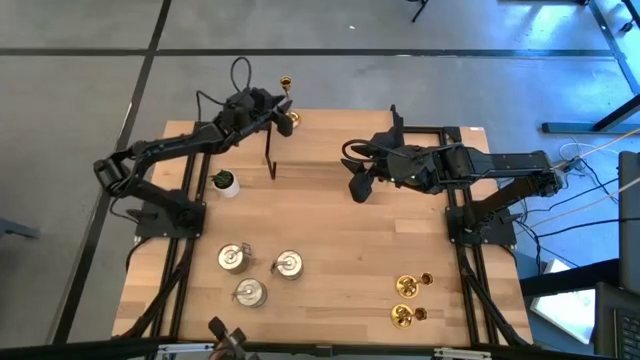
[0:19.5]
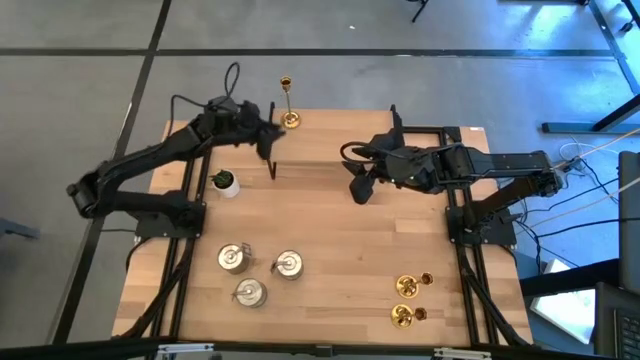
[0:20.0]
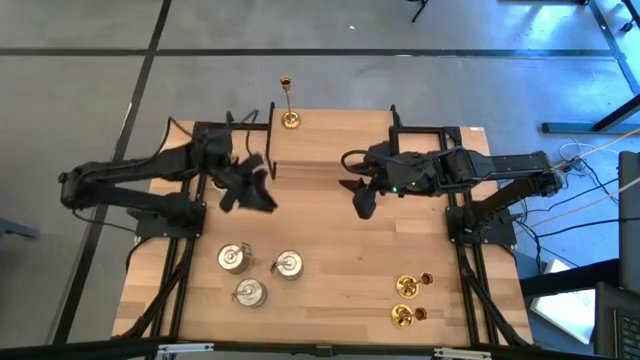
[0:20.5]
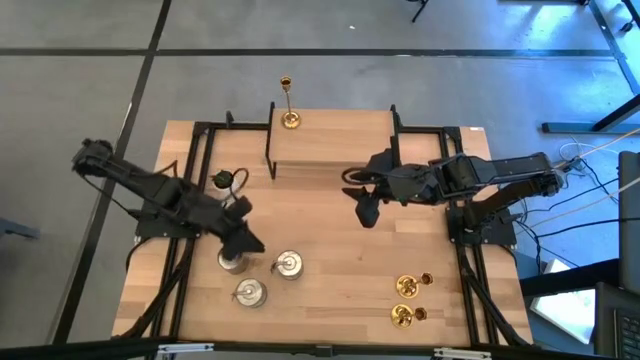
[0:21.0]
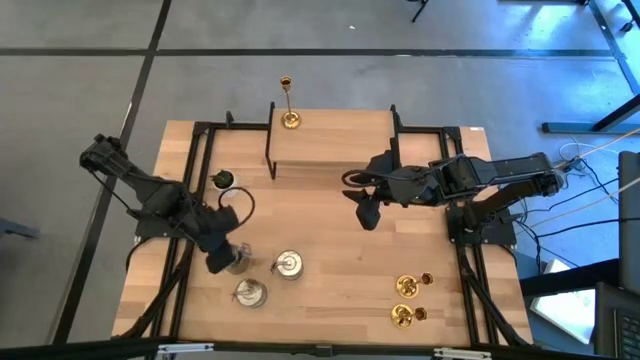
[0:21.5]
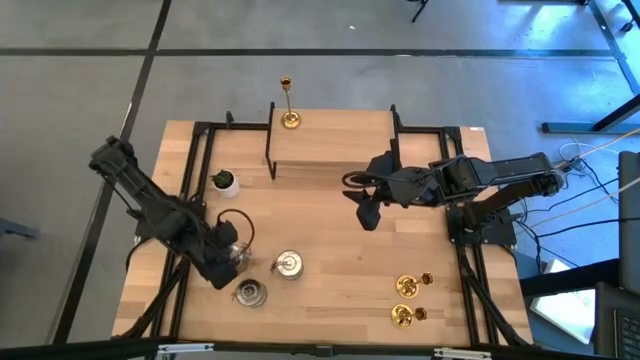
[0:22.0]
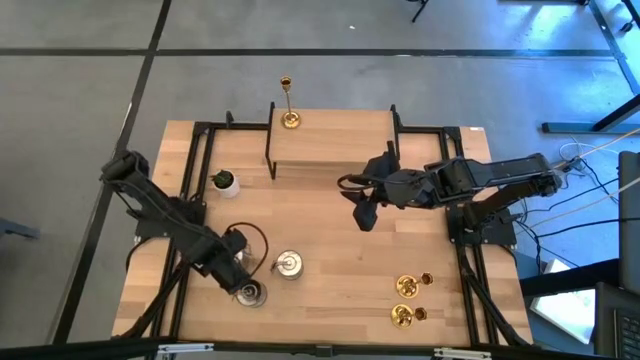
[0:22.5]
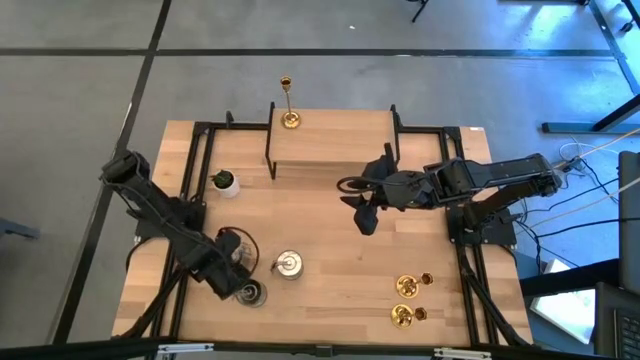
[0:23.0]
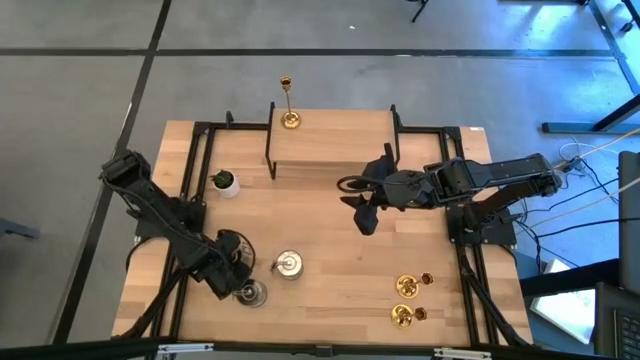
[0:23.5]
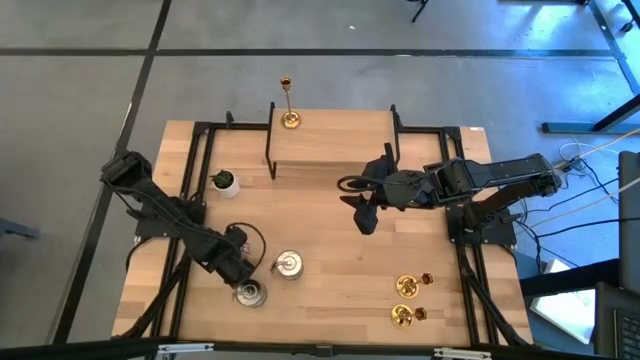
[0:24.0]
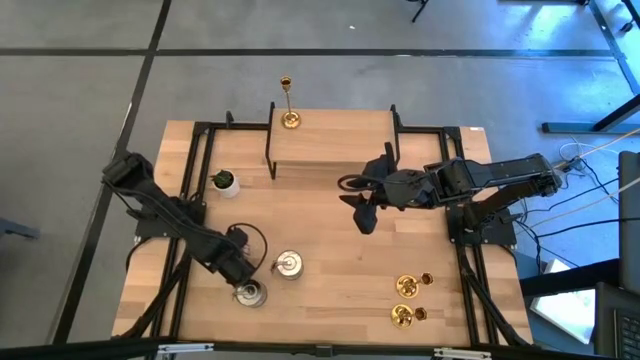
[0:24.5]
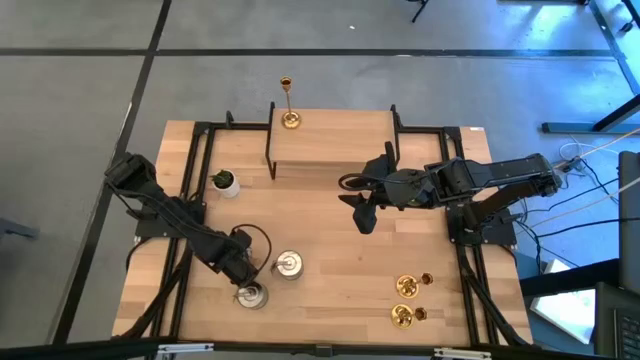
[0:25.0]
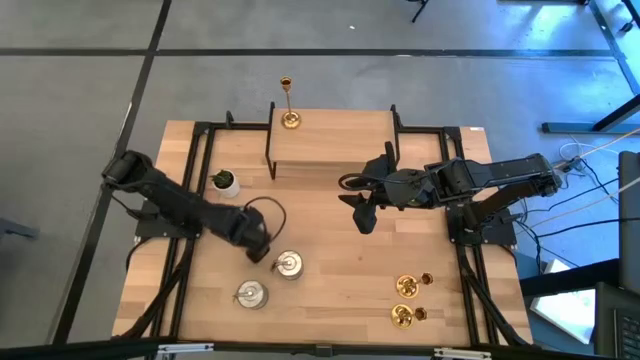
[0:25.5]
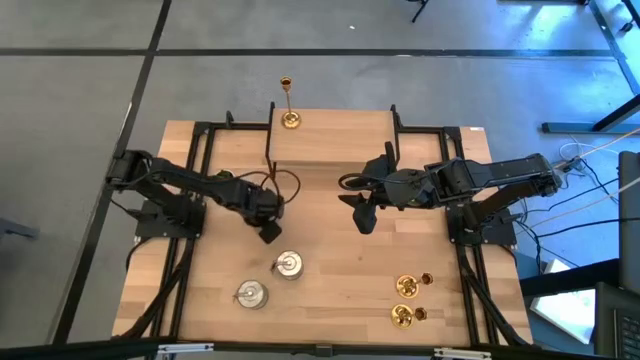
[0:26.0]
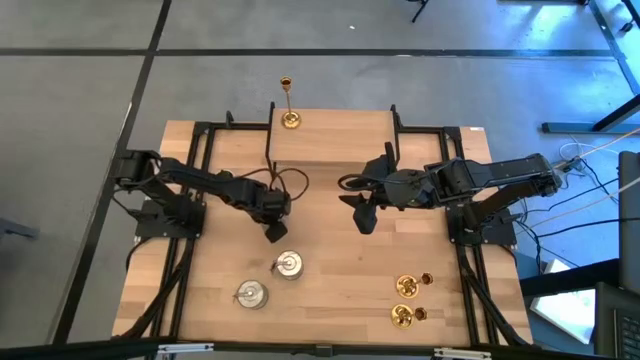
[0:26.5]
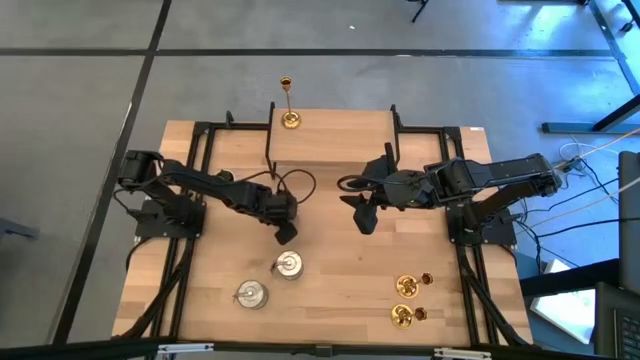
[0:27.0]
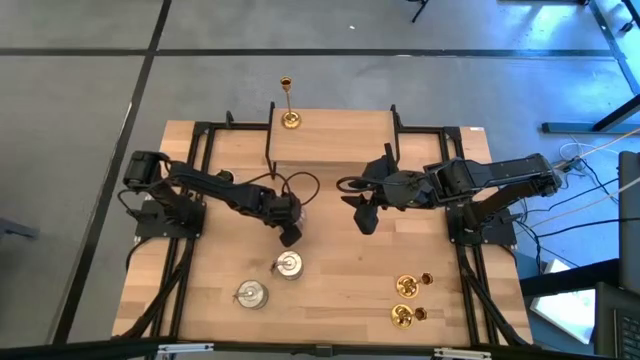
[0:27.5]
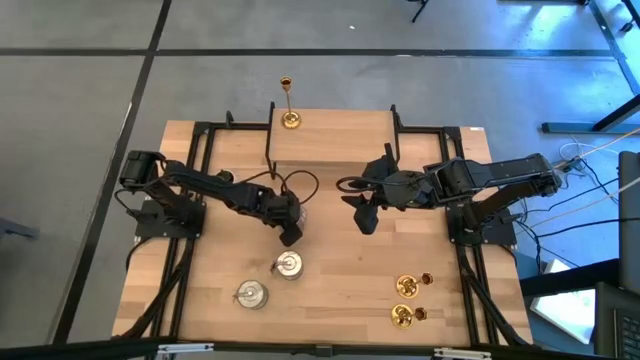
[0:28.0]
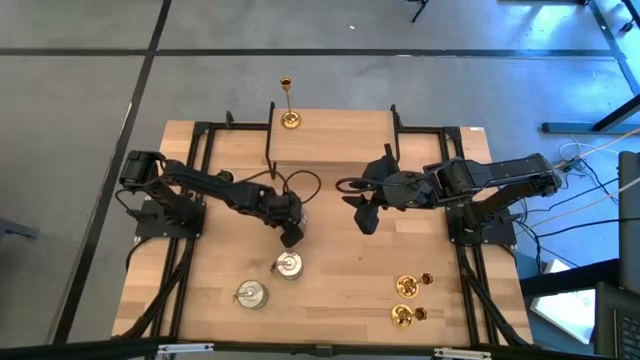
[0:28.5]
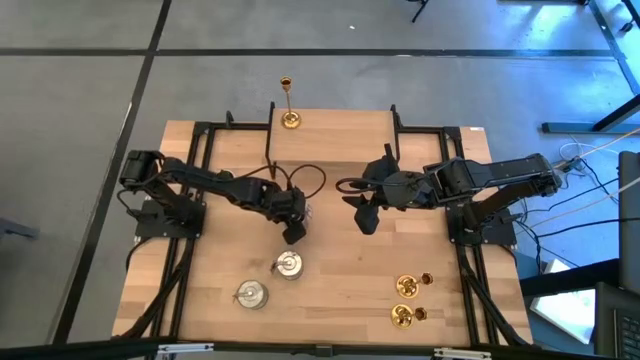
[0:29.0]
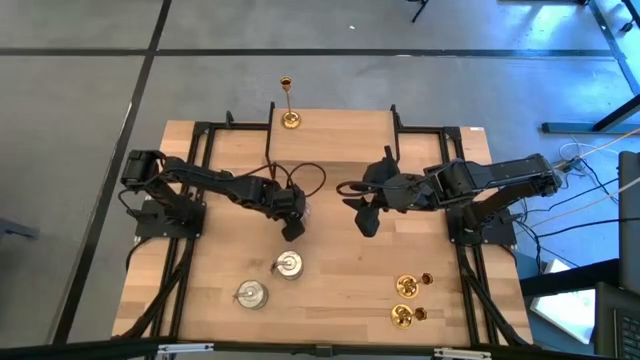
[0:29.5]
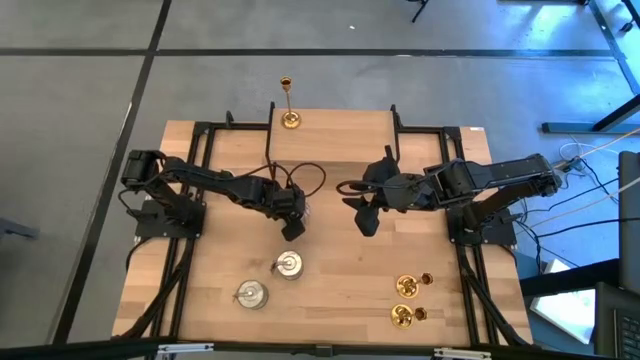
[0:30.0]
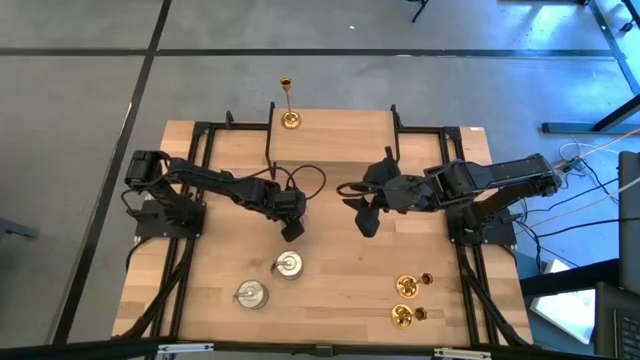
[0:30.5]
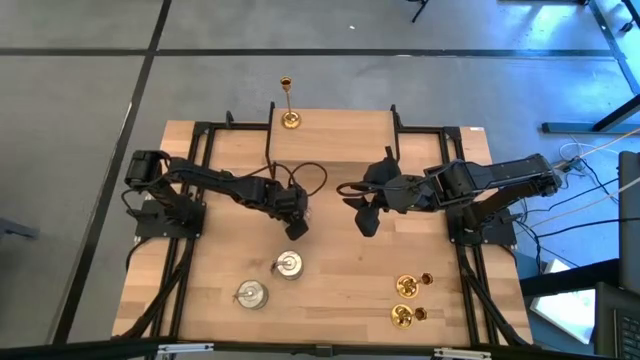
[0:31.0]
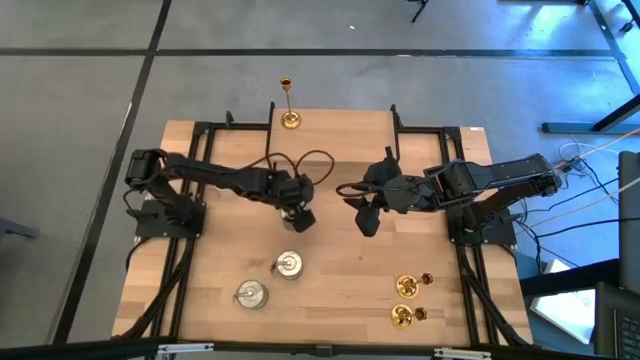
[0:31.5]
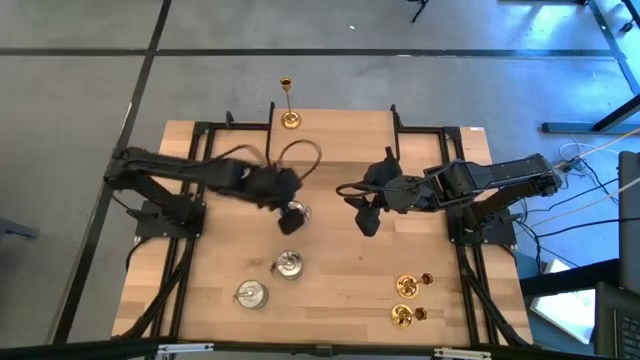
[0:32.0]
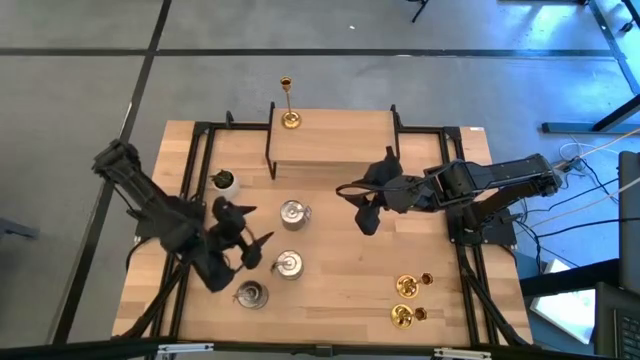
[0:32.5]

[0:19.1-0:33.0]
Task: Pick & Place candle stick holders
Put the top silver scented candle on the shelf

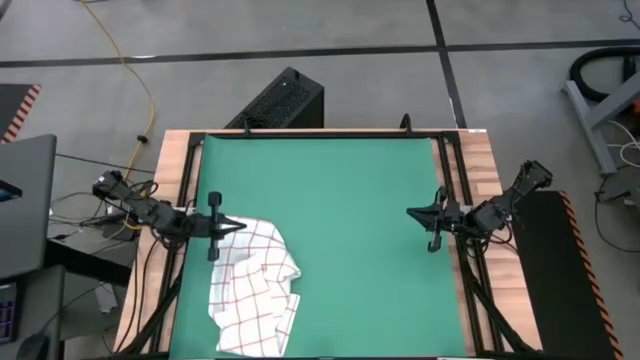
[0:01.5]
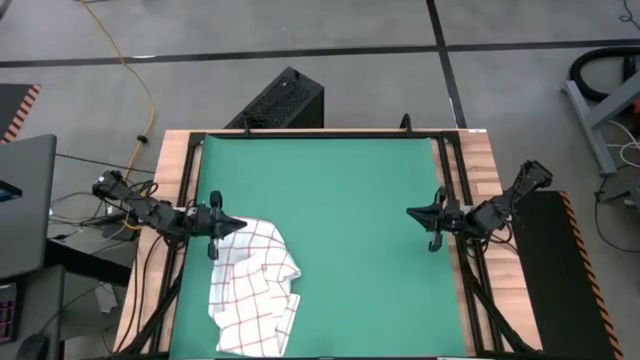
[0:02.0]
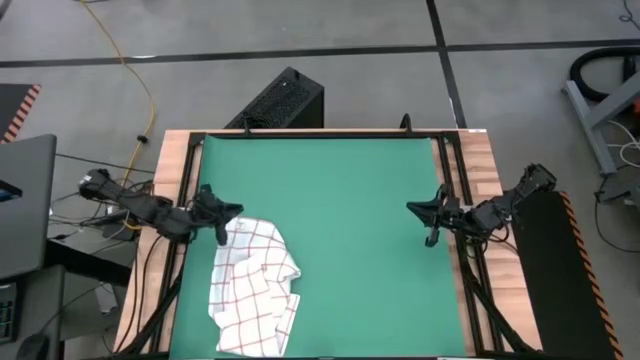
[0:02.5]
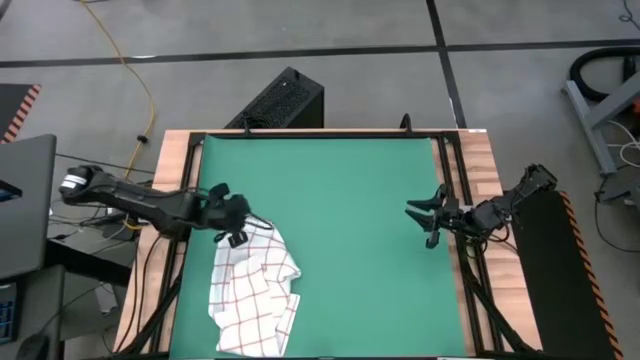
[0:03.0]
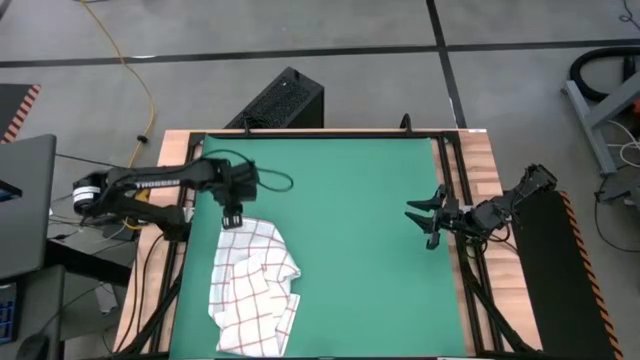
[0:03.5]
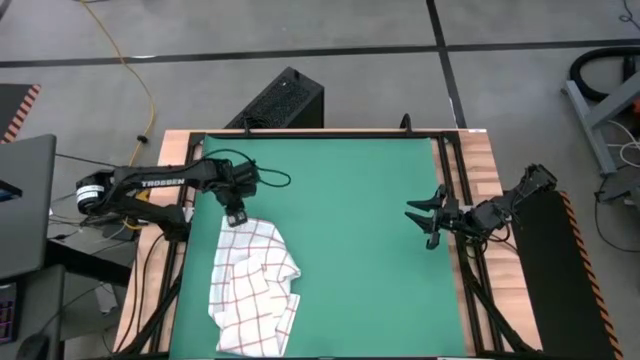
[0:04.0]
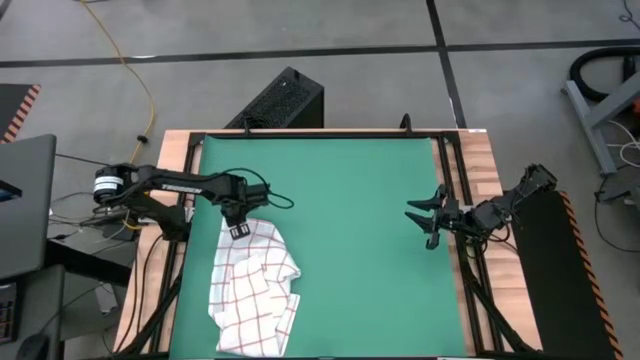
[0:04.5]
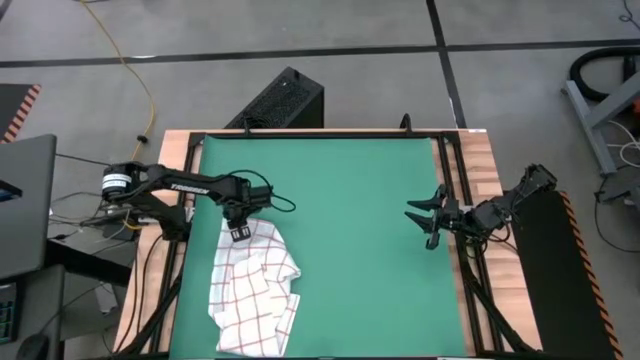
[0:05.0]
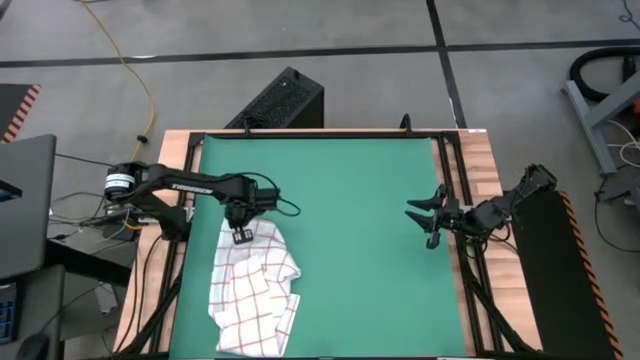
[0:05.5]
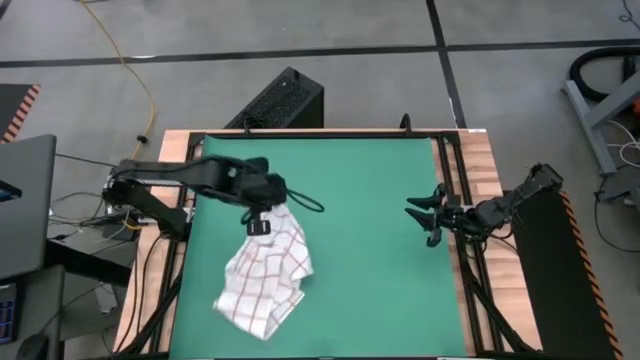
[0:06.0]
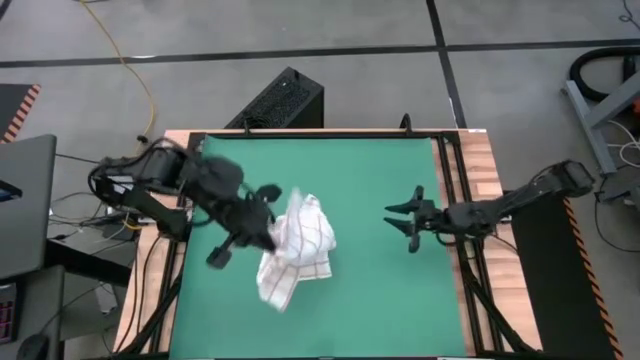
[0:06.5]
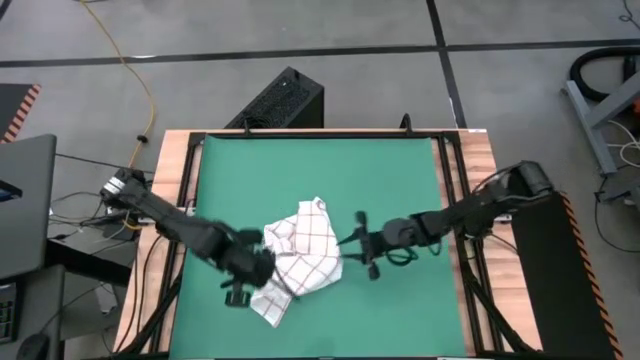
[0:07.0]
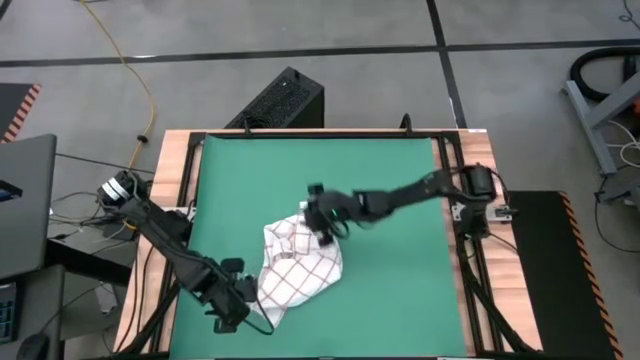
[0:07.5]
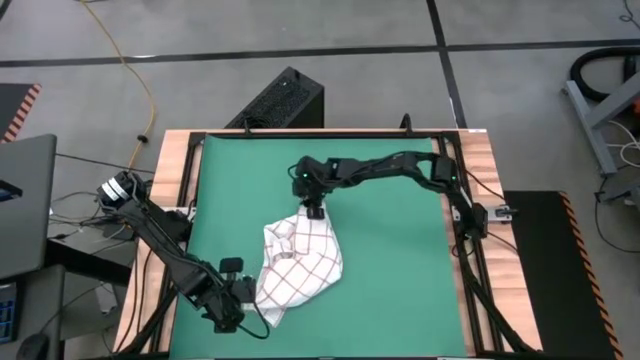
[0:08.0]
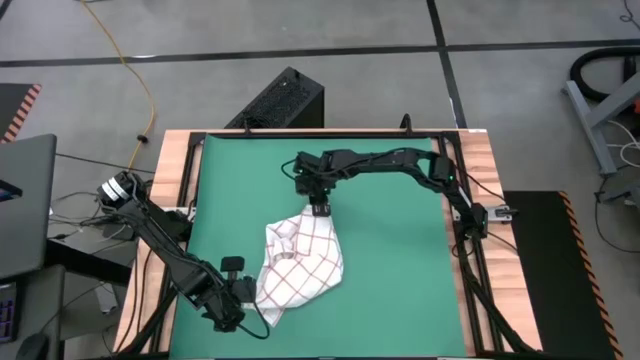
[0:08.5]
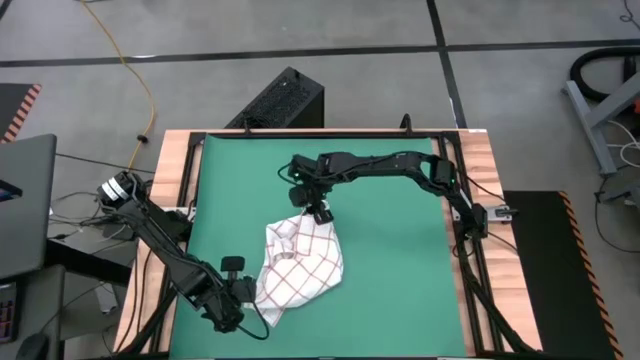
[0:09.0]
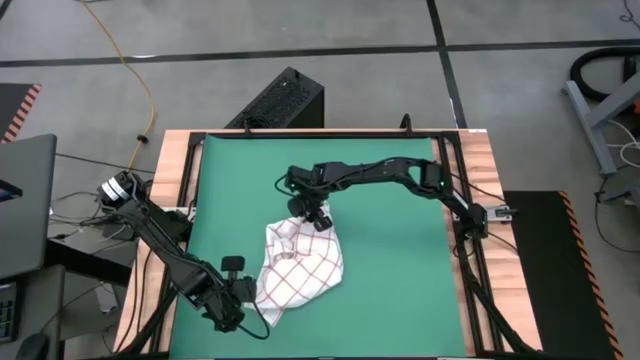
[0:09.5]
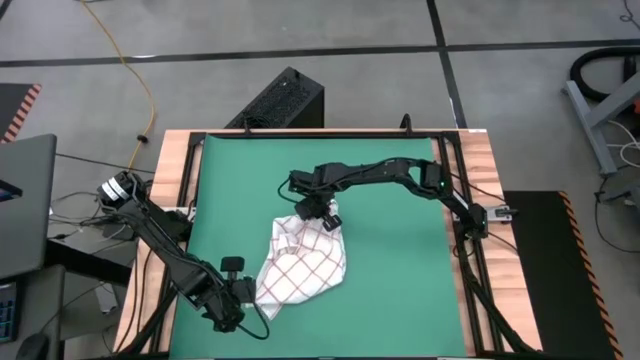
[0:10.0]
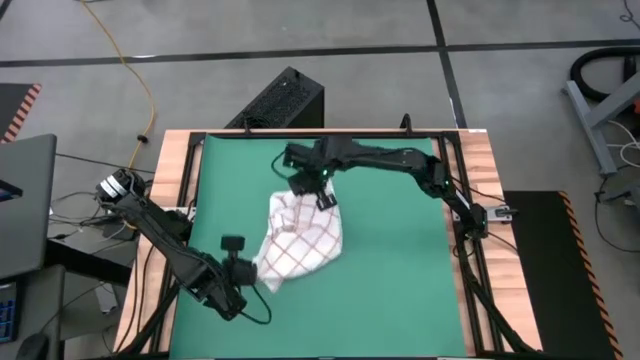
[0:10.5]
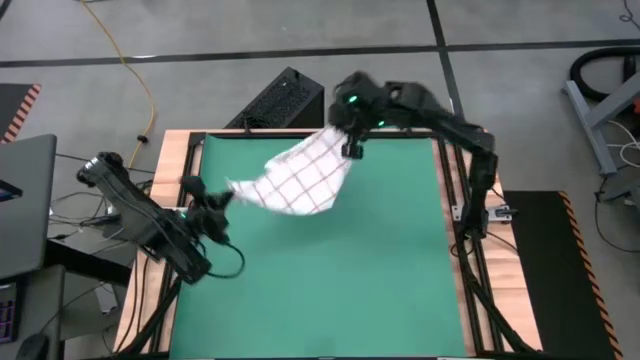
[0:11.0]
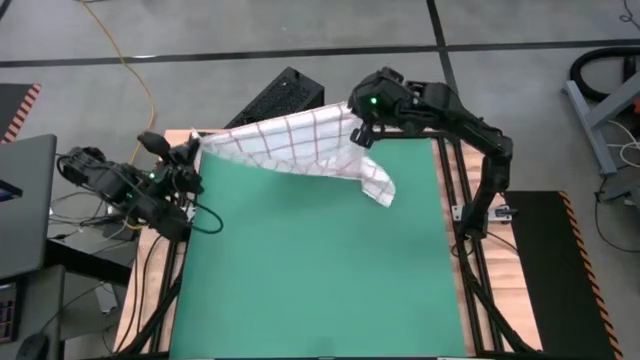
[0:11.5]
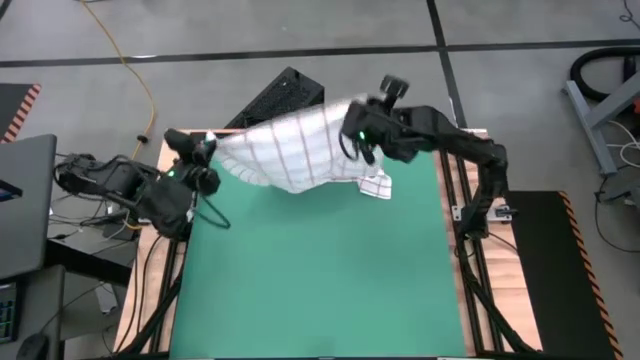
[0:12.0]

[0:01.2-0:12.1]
Task: Roll towel into tight, uniform cylinder
Fold the white towel
